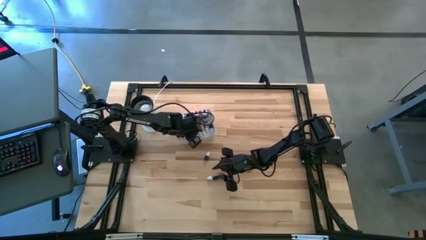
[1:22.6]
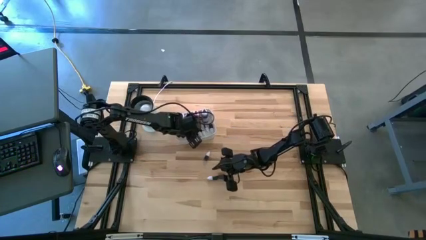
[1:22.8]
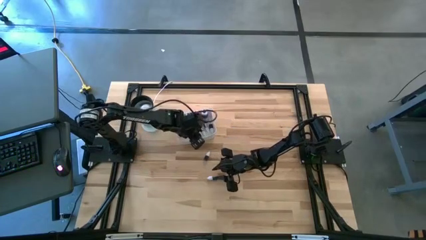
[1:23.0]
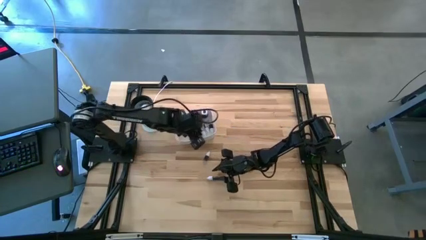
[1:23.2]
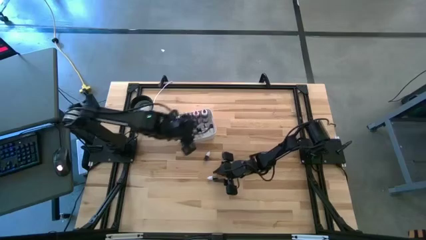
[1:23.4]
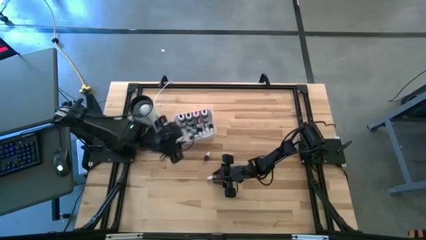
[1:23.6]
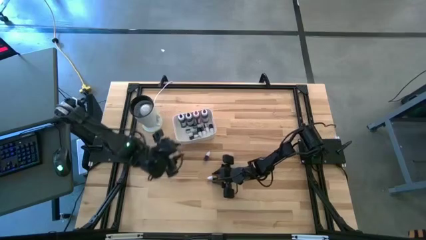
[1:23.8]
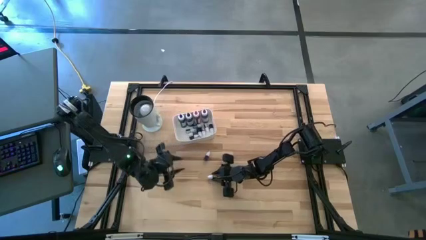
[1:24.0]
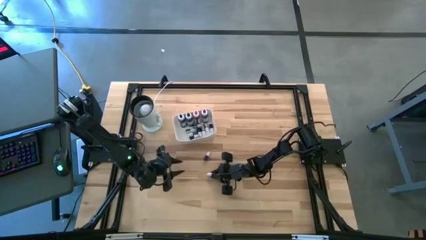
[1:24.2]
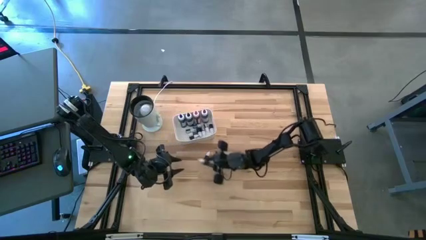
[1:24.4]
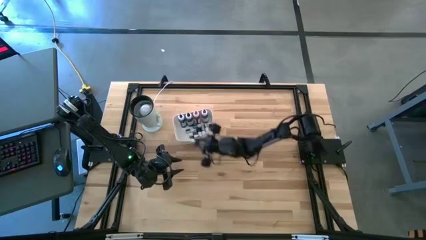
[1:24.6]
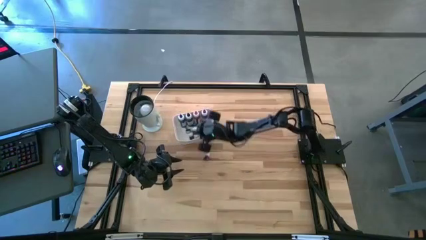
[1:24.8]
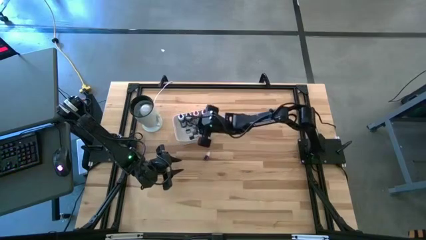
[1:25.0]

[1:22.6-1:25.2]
Task: Pick & Place food coloring
Put the small green food coloring bottle into the white bin

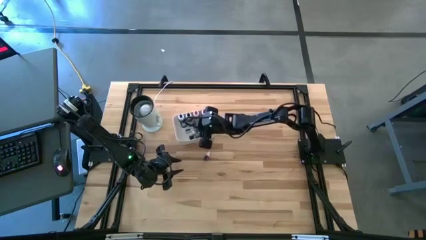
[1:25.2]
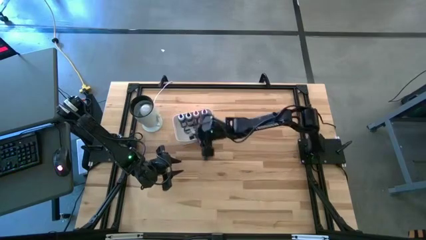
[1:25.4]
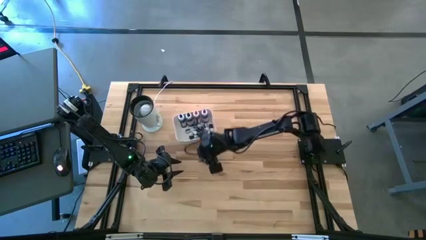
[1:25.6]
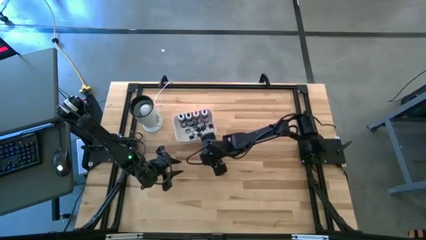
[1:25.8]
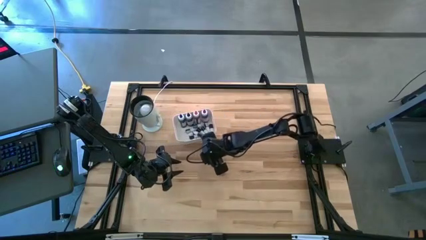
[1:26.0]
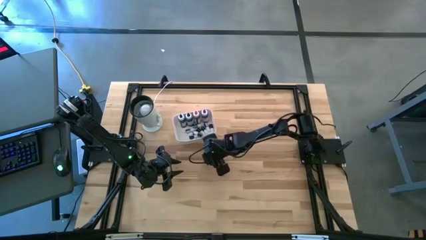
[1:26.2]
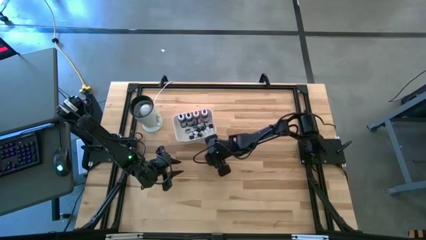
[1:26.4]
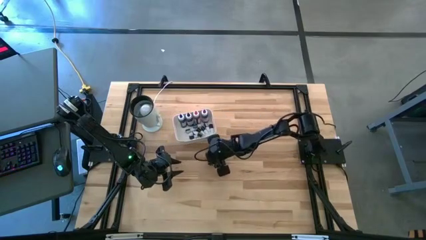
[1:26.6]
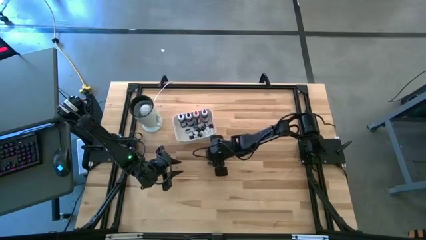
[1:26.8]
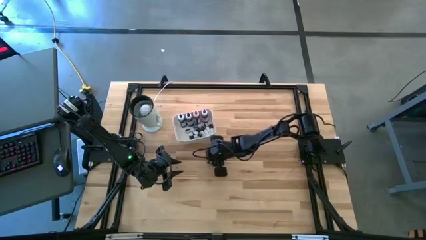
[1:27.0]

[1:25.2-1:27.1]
Put the small violet food coloring bottle into the white bin

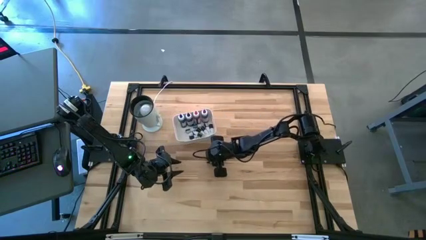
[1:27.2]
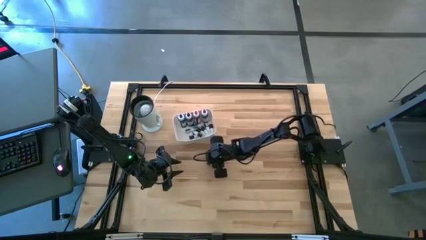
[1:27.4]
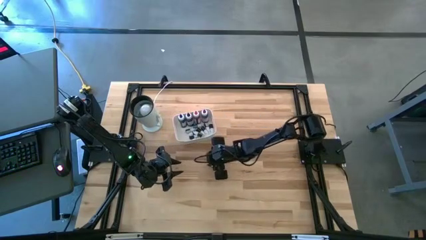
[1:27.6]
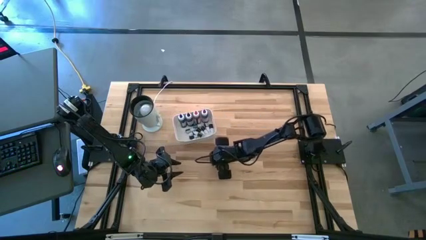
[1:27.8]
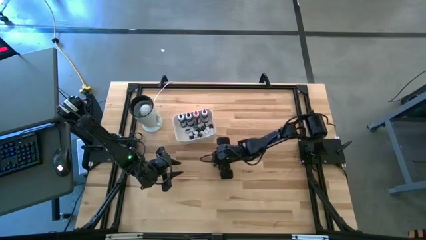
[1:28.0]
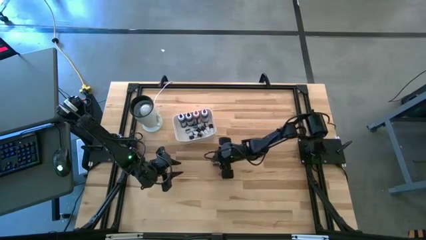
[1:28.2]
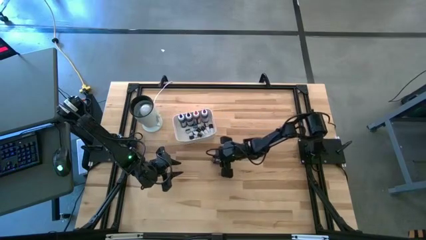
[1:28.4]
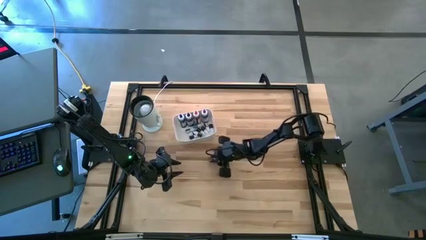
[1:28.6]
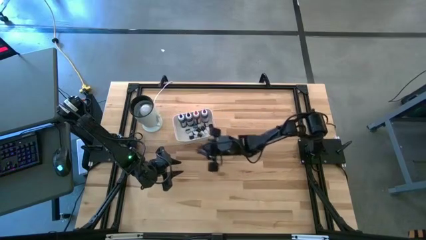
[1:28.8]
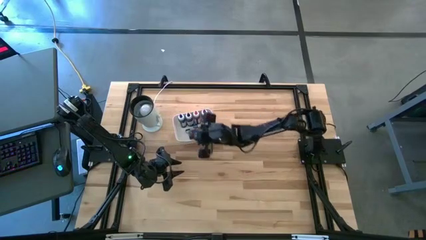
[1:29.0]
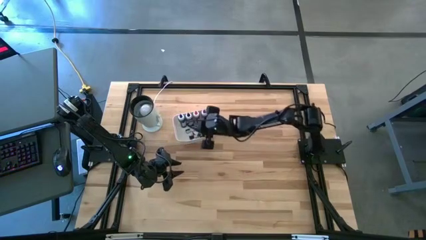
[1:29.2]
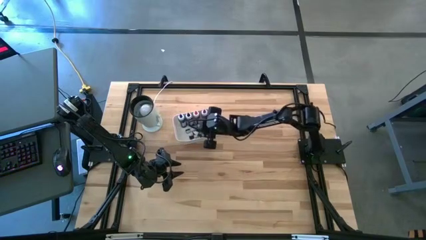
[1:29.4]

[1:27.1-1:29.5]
Put the small violet food coloring bottle into the white bin

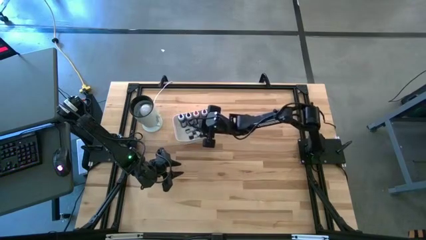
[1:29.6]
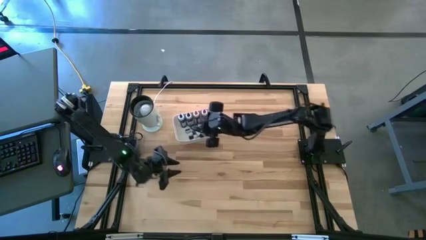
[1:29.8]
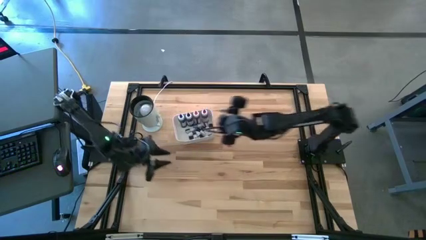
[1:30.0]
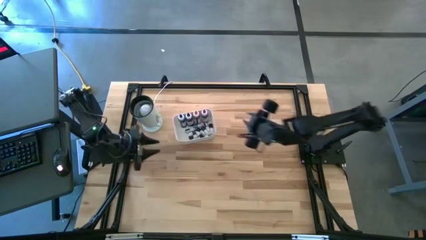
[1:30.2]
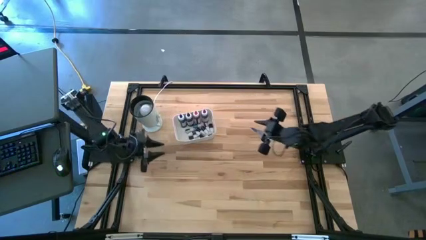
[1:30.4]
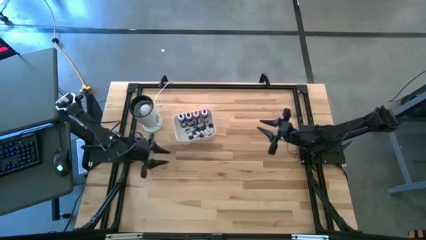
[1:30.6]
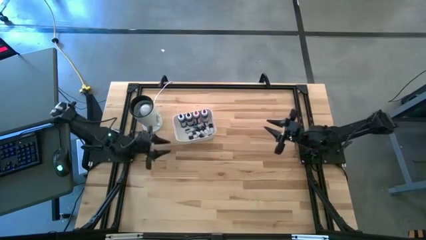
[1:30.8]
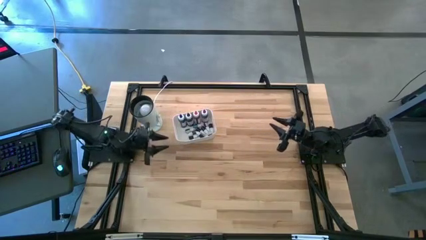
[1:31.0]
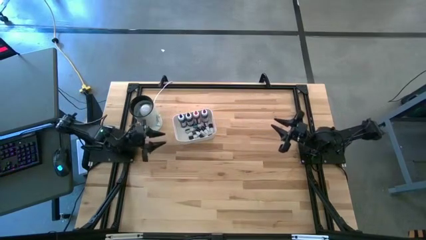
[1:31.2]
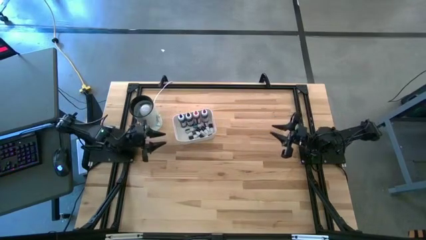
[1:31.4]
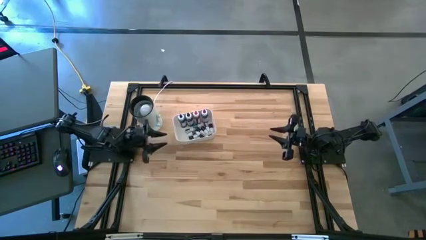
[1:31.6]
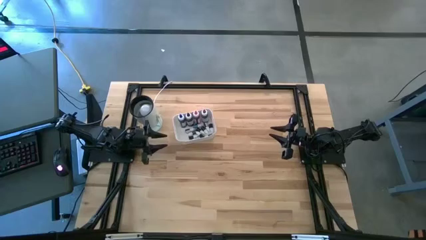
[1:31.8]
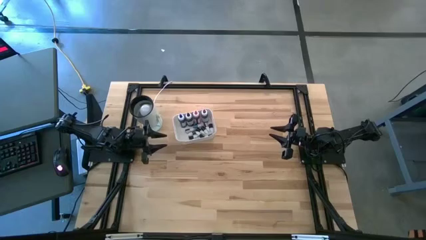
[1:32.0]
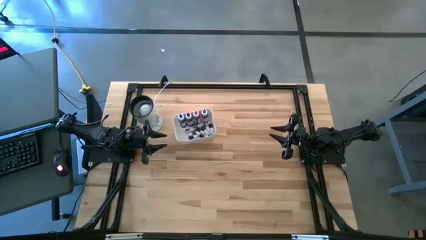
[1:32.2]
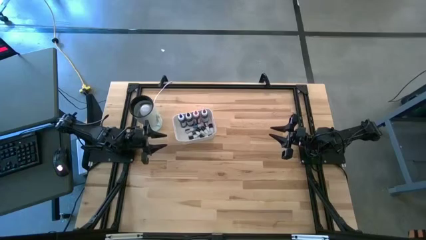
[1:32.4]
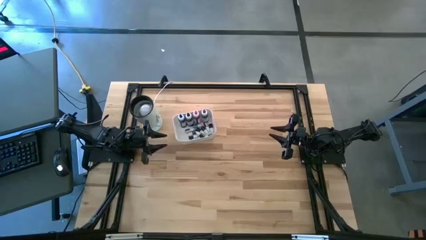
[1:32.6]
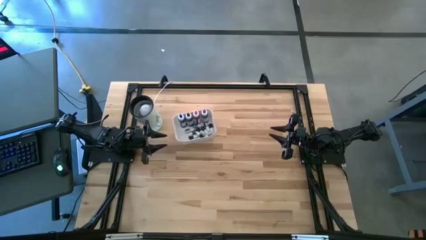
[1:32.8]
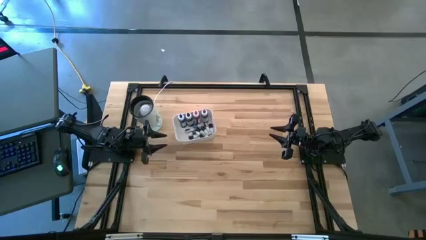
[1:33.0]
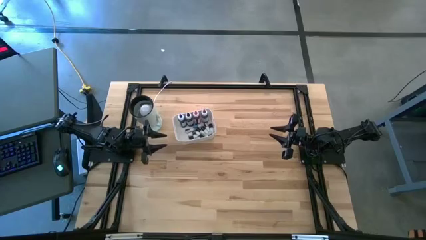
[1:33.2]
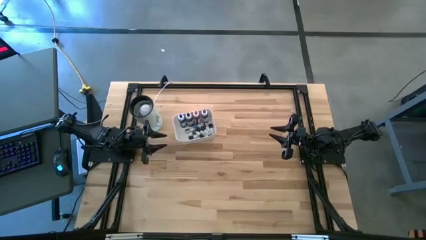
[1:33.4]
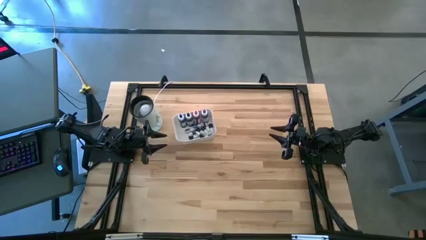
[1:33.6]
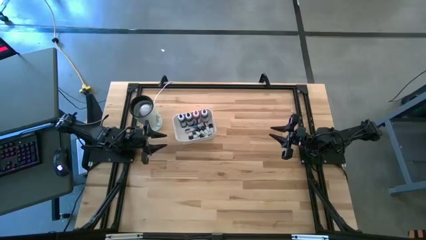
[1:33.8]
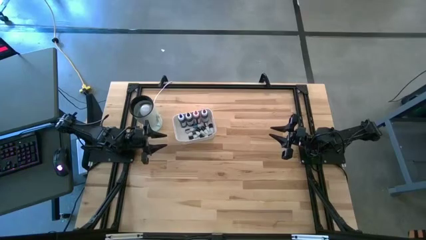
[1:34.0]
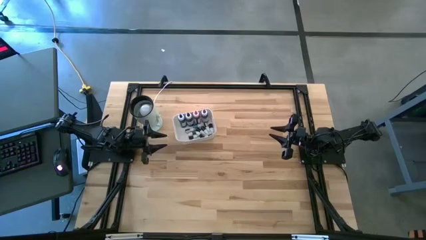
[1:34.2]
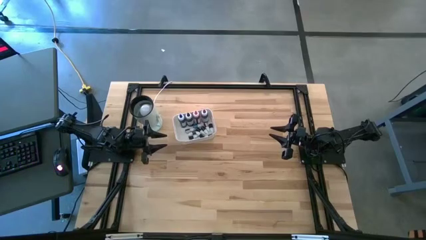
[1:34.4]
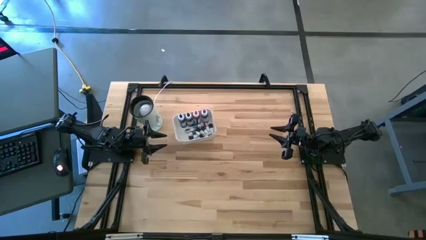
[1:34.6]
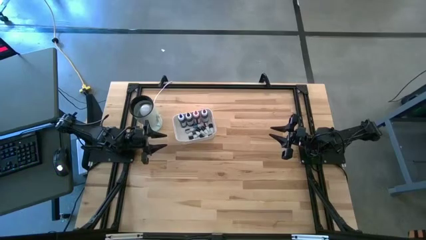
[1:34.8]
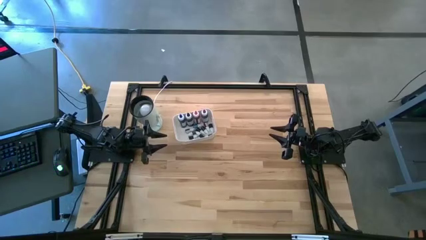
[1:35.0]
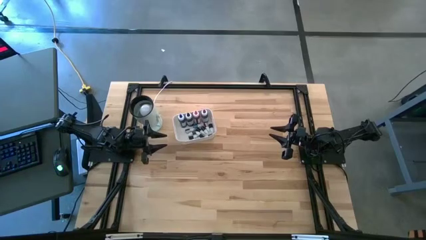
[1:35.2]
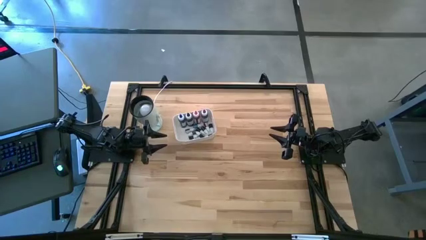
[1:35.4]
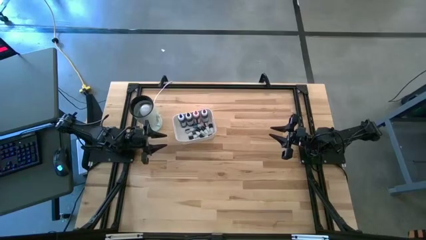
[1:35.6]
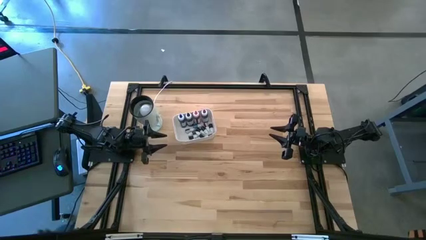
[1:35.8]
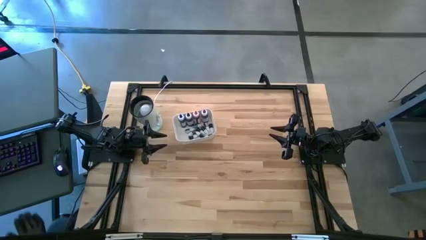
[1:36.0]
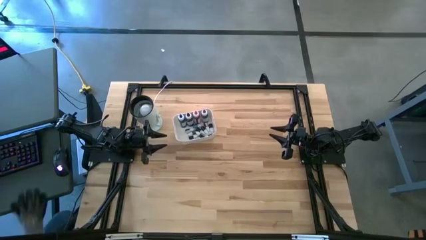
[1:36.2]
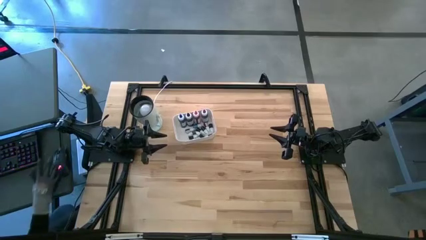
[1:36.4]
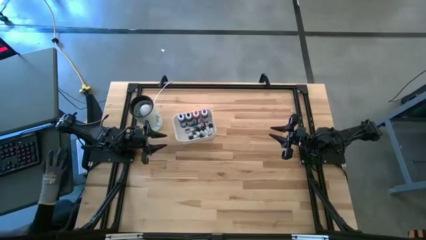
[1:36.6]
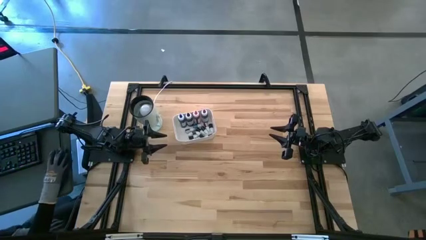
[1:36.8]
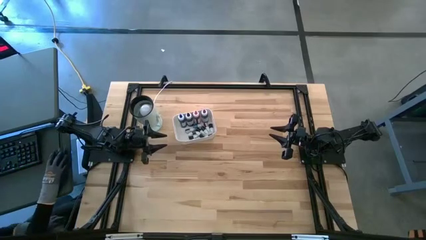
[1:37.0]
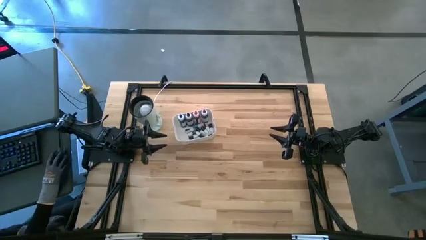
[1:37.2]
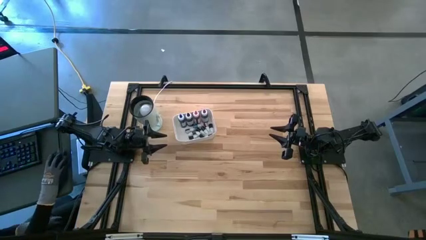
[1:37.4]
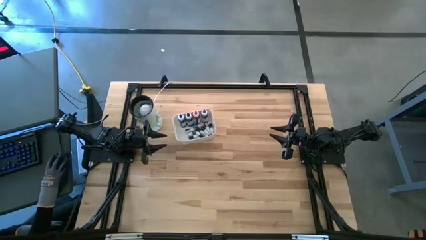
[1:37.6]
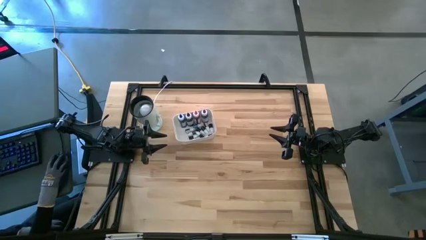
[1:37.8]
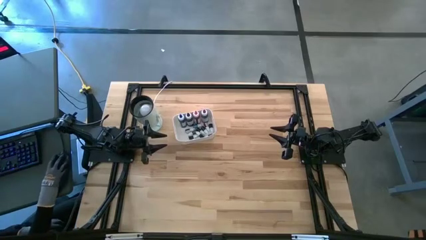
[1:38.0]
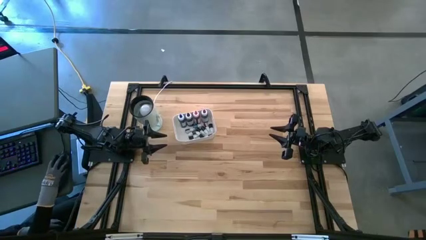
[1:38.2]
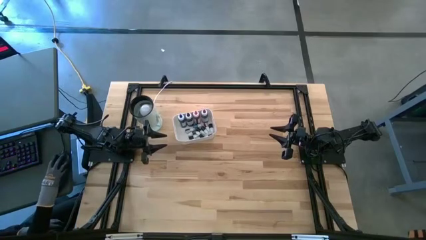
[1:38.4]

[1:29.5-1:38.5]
Return to Home Position
